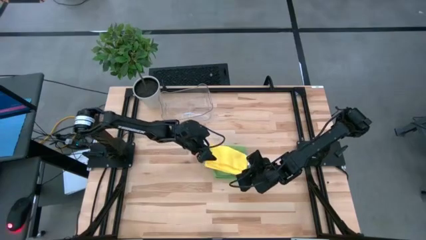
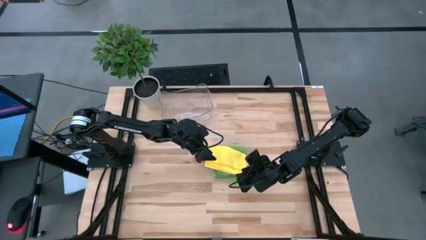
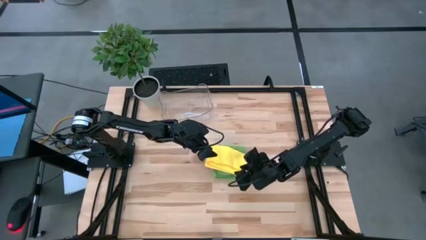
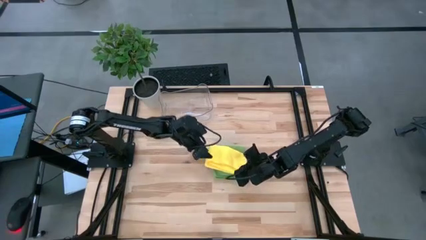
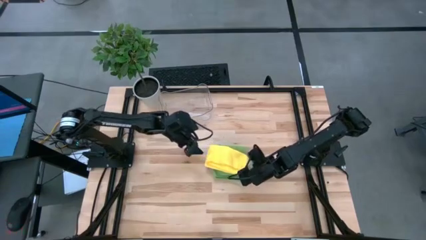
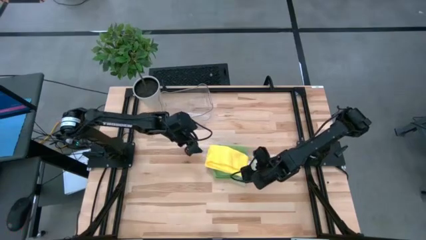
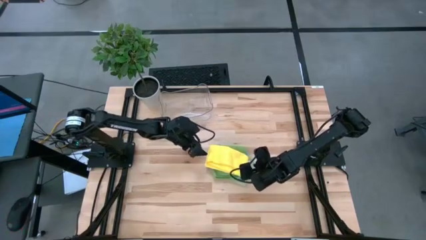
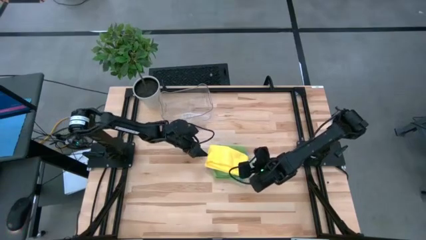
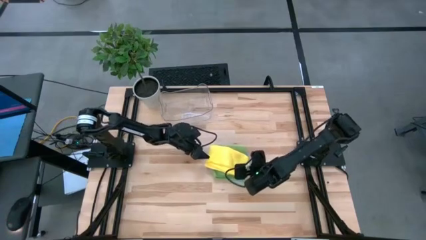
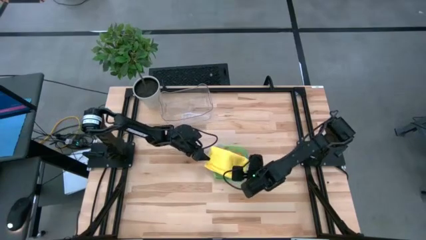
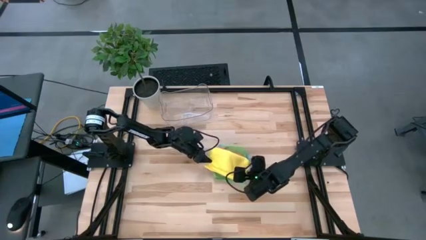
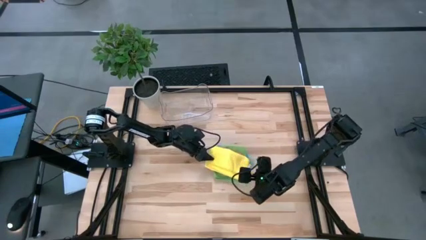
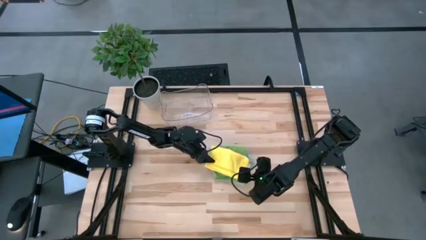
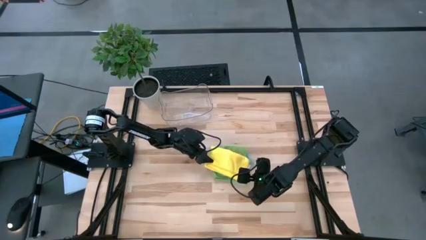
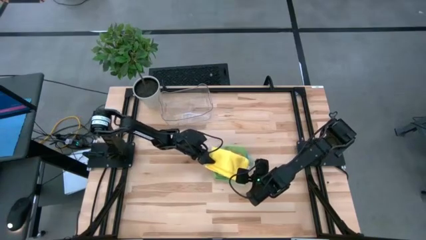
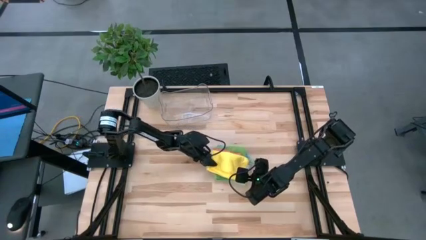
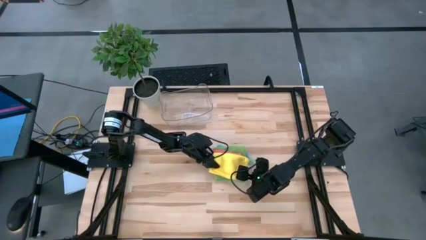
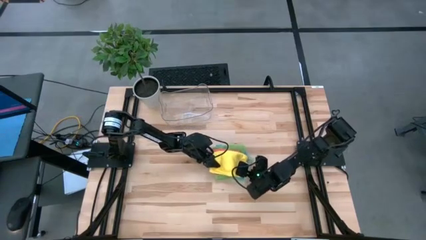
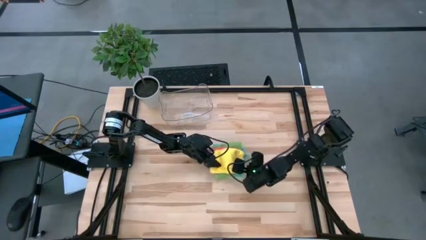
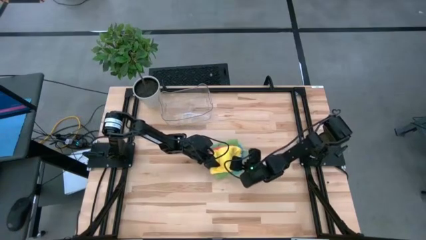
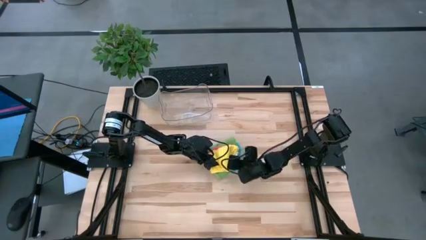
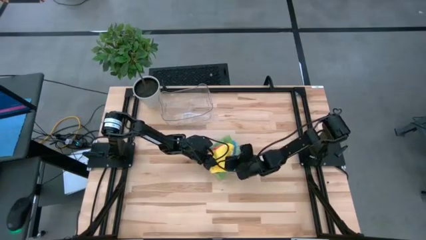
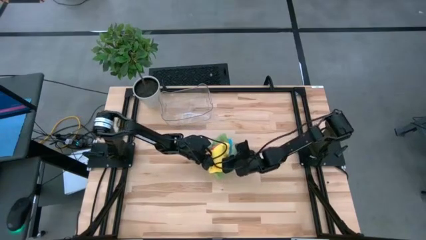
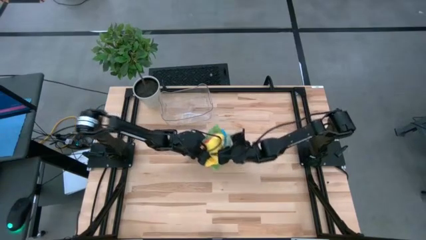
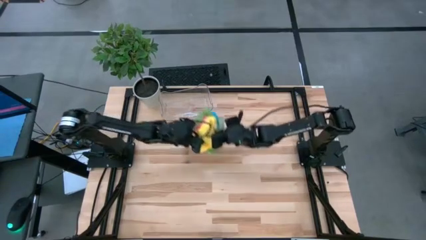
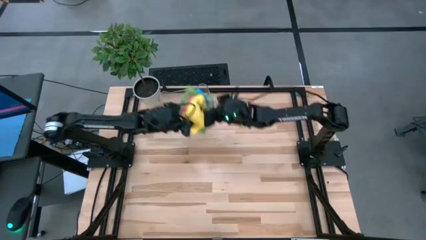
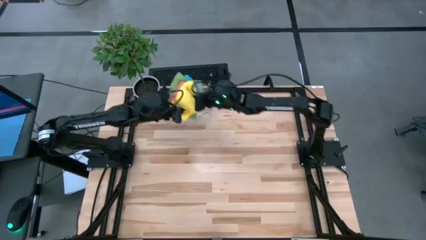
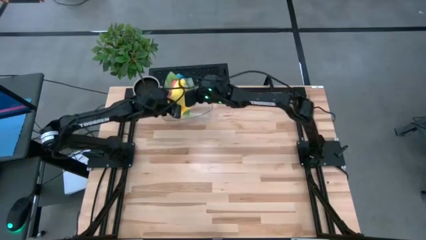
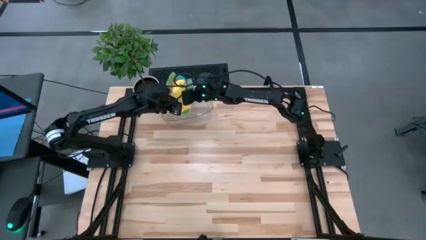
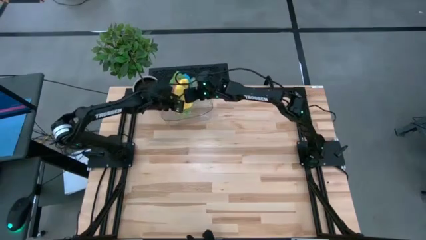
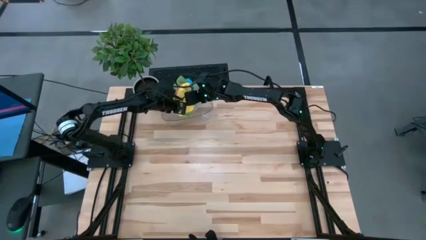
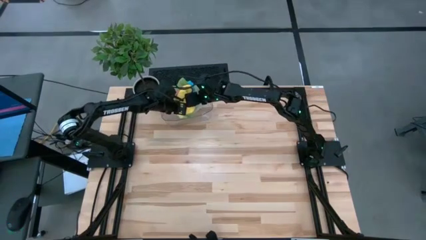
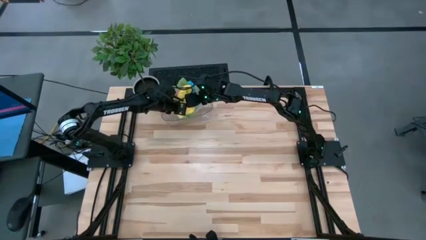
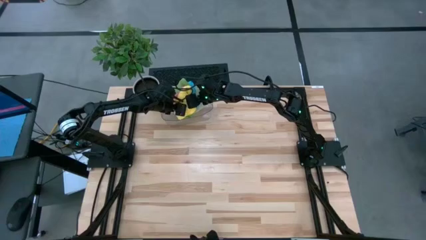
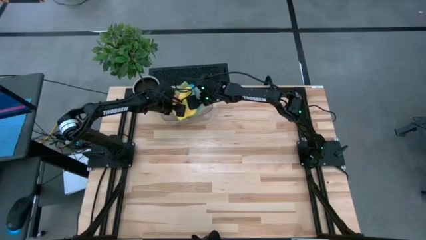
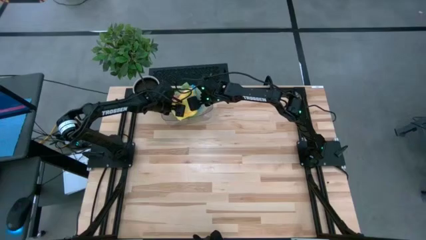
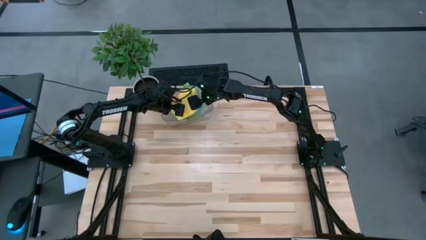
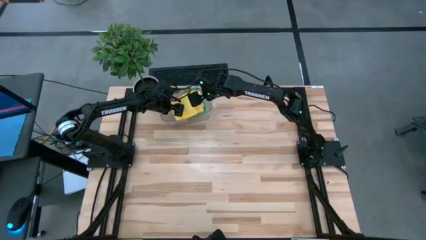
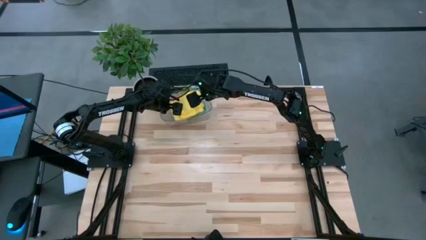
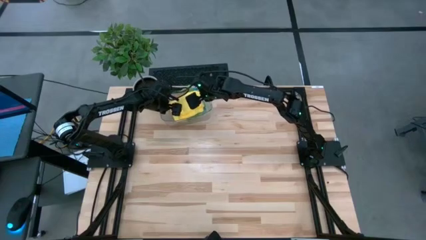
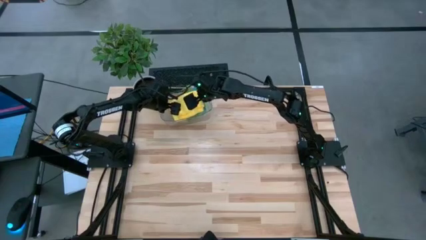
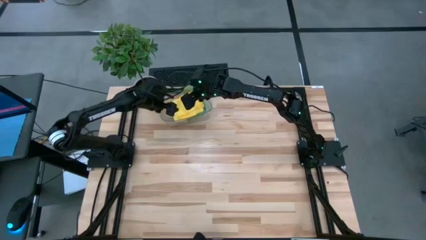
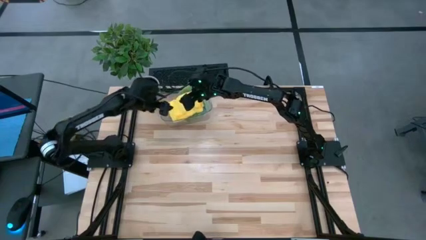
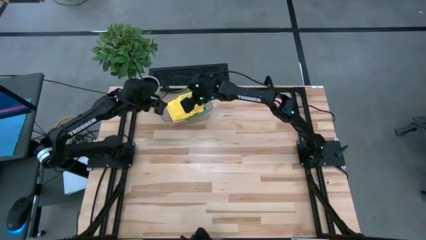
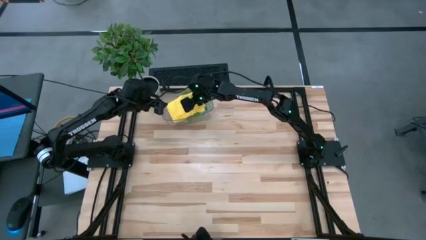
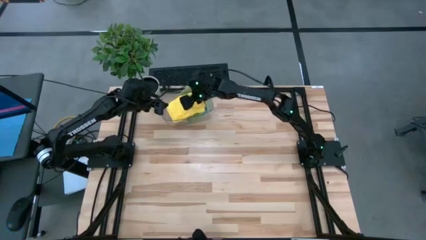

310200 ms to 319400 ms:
Task: Fold microfiber towels
Put the stacked microfiber cloths into the transparent bin

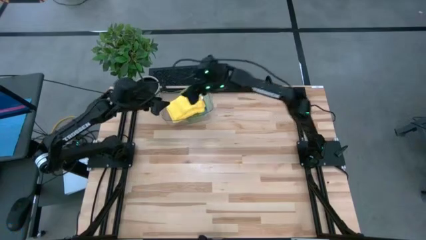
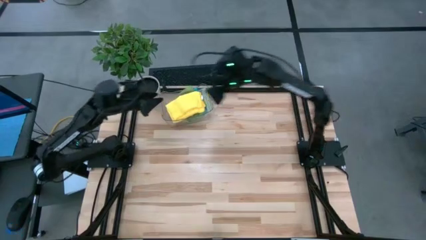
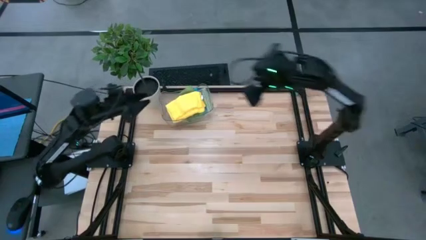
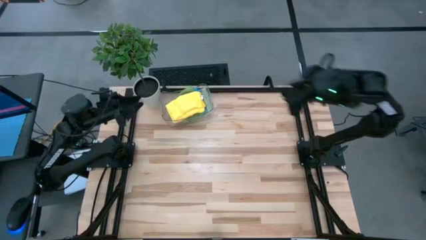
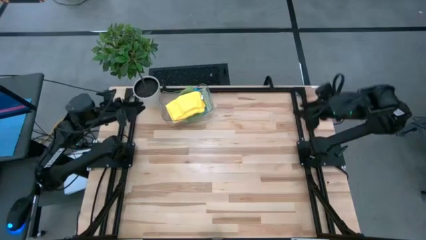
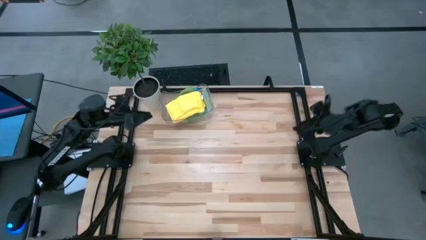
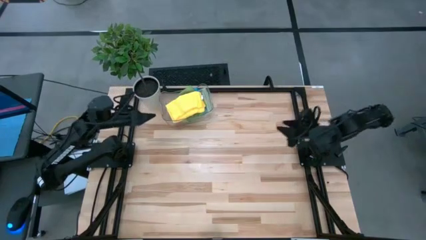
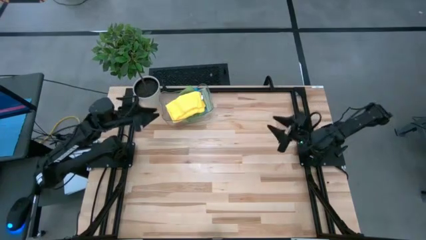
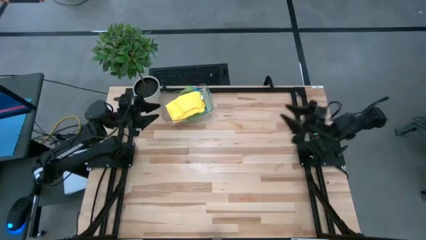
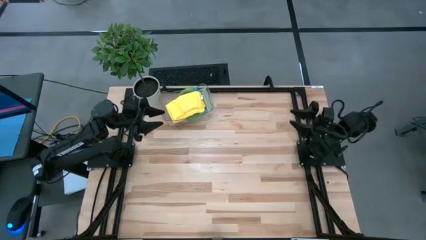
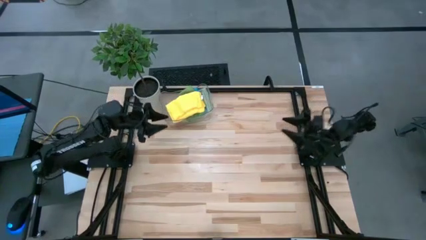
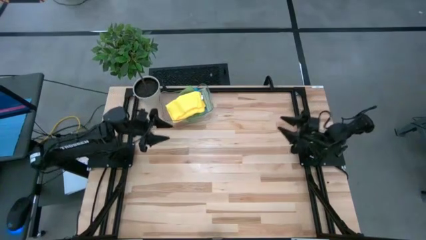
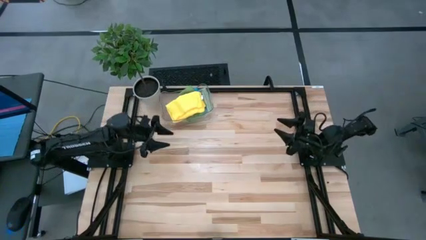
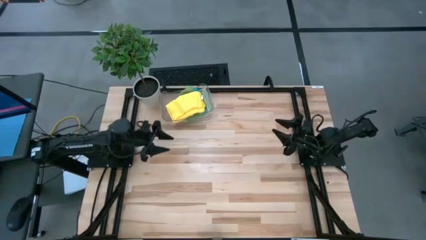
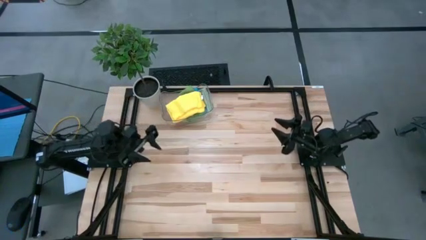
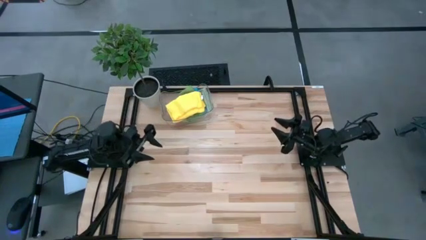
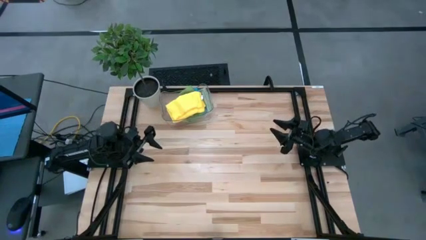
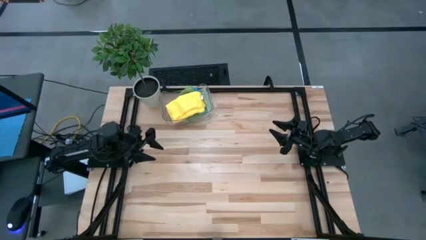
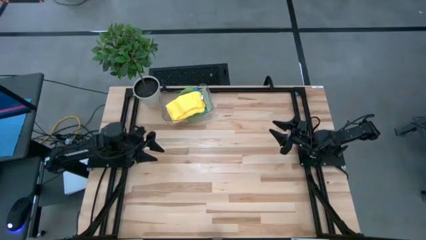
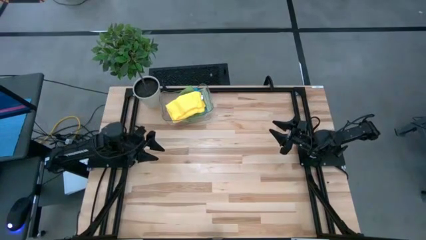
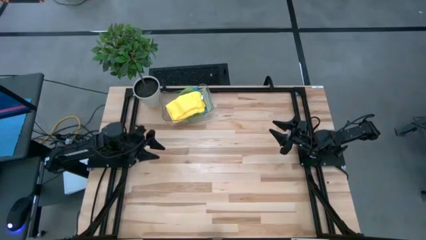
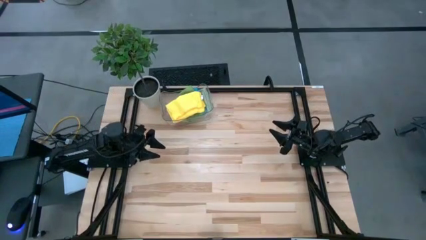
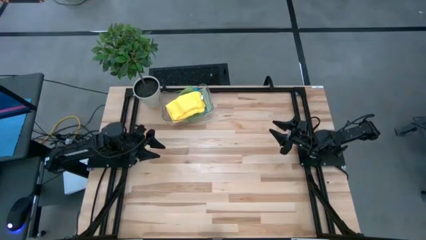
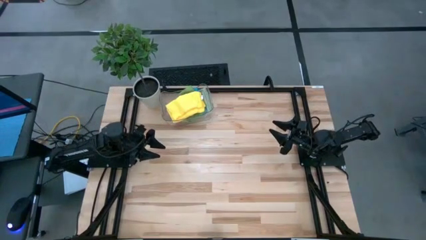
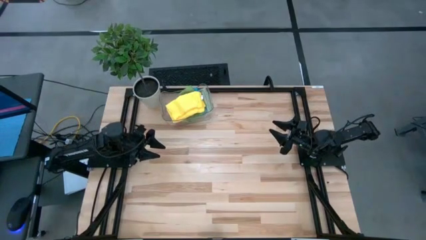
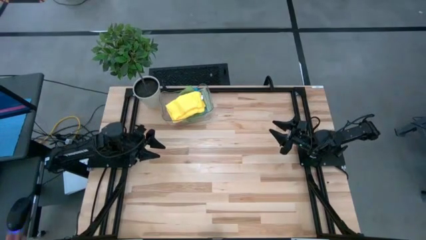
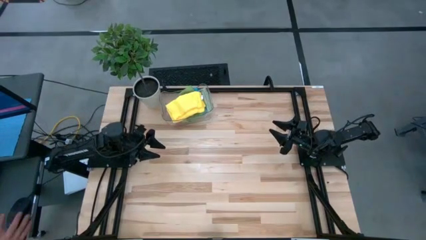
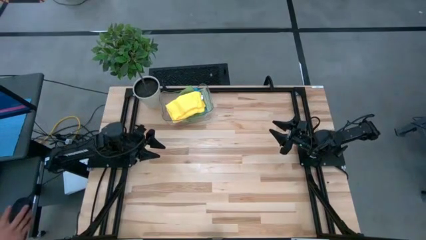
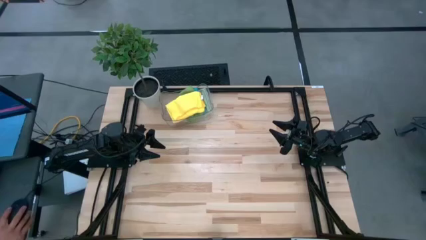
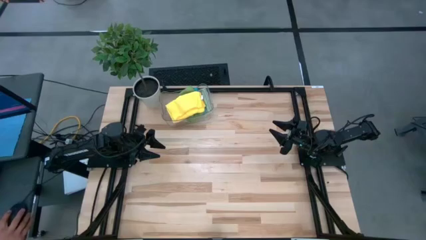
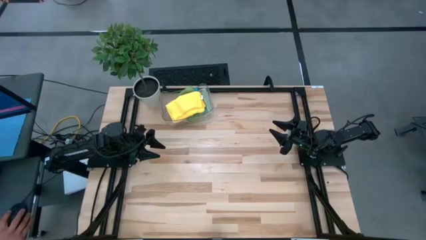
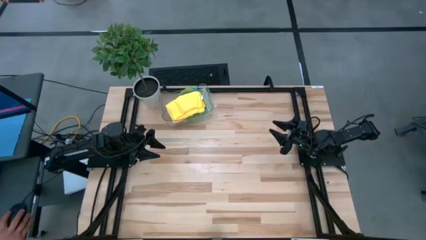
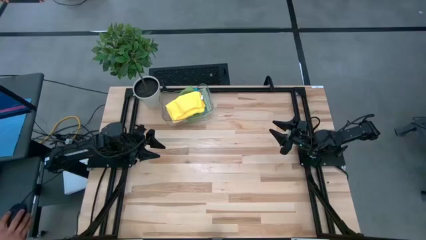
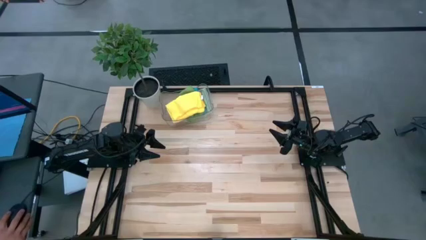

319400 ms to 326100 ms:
Return to Home Position
